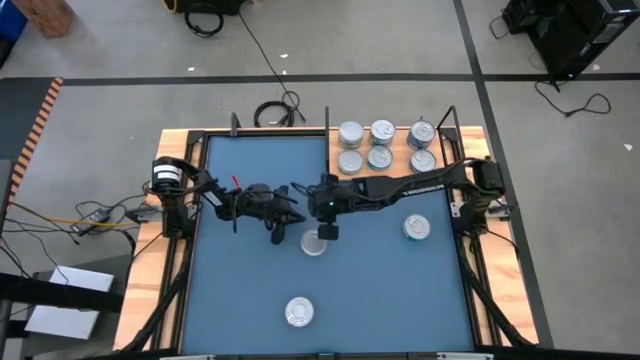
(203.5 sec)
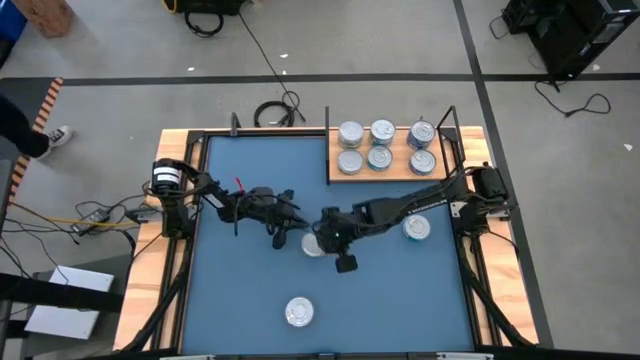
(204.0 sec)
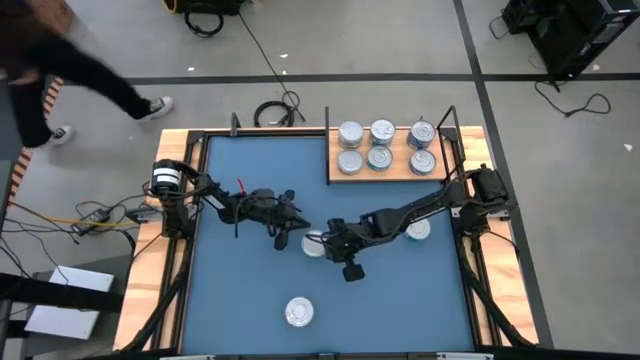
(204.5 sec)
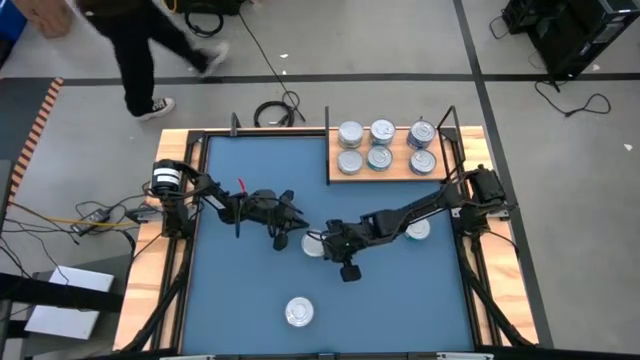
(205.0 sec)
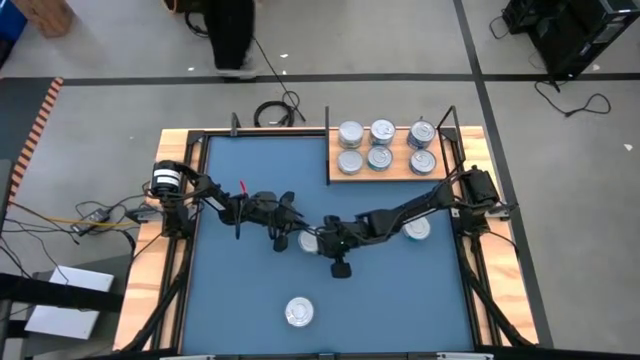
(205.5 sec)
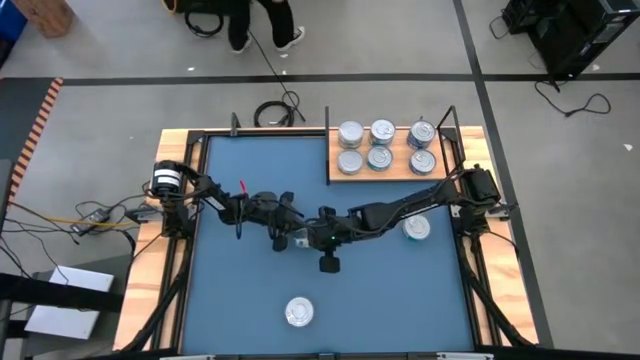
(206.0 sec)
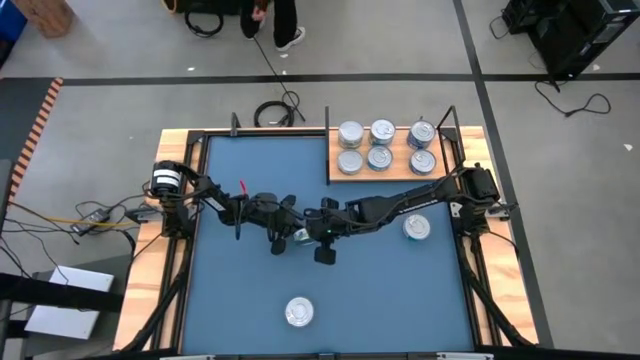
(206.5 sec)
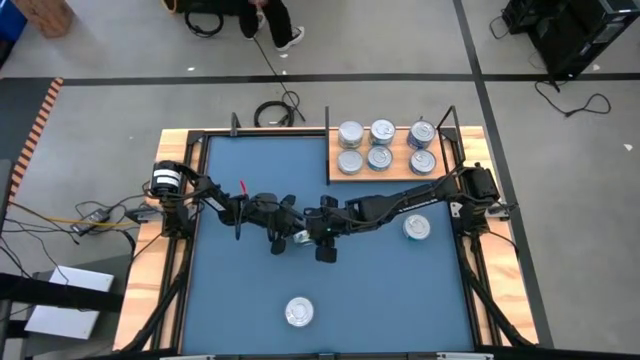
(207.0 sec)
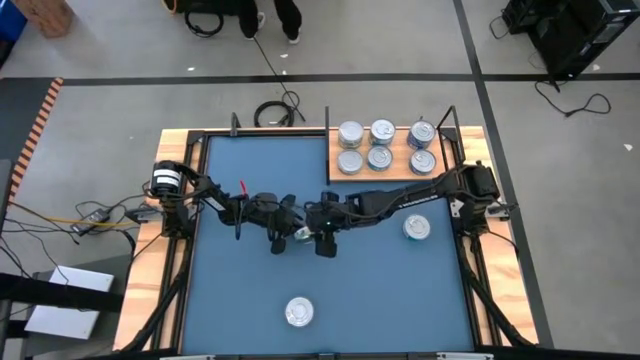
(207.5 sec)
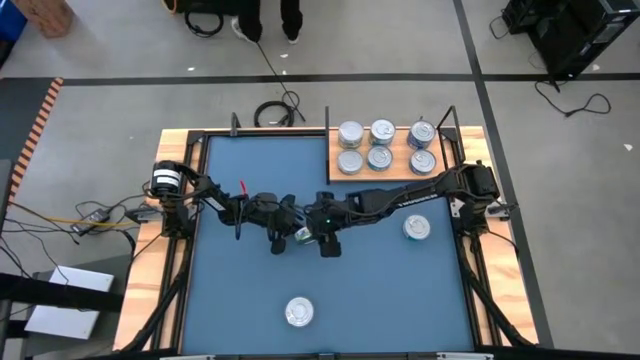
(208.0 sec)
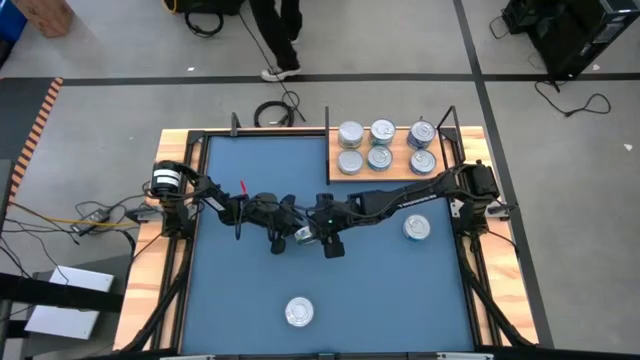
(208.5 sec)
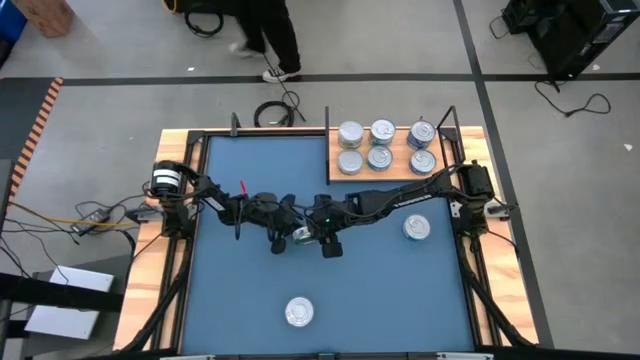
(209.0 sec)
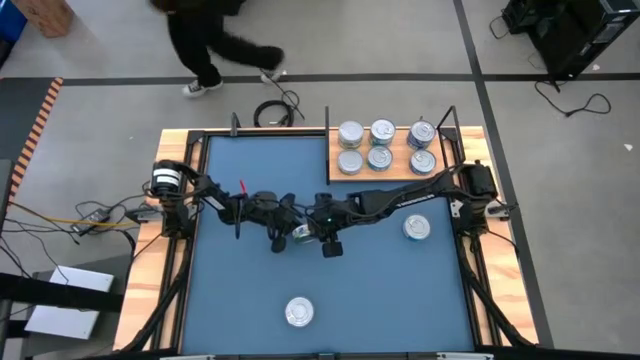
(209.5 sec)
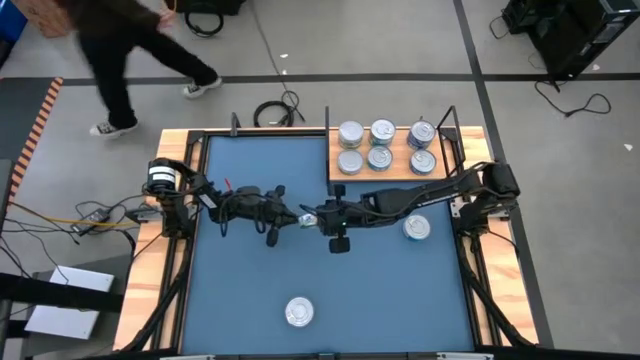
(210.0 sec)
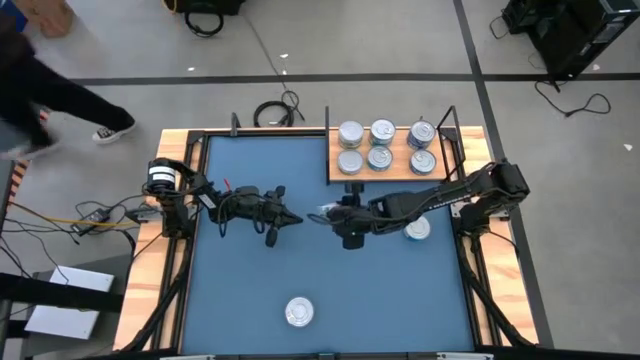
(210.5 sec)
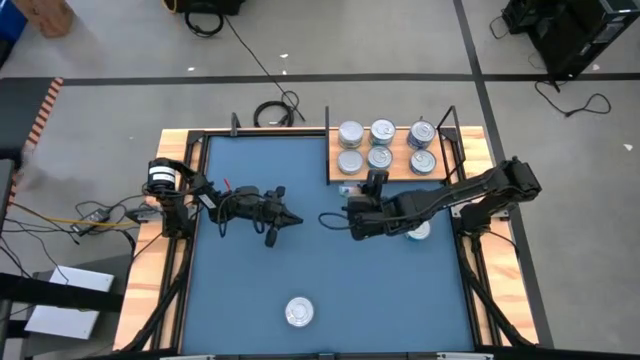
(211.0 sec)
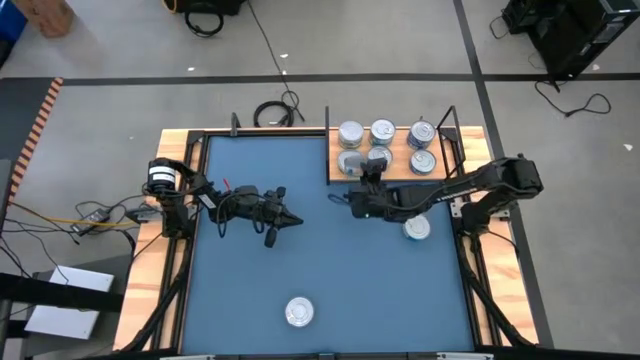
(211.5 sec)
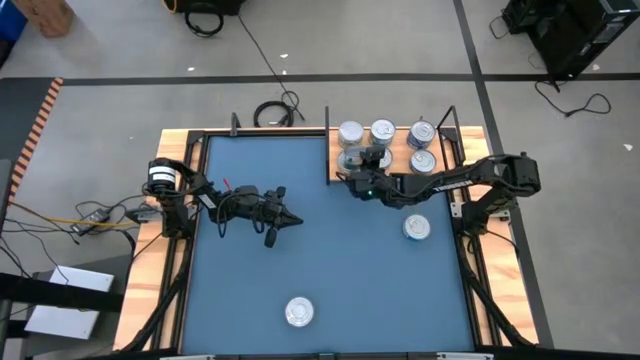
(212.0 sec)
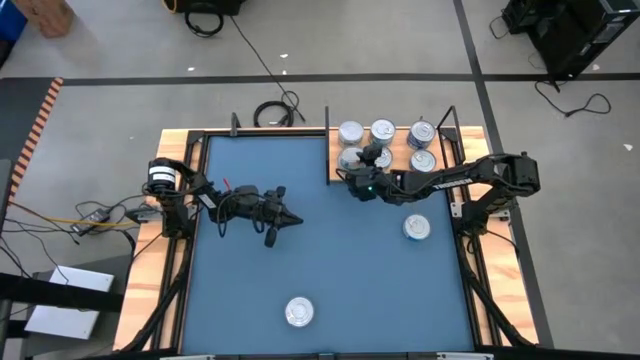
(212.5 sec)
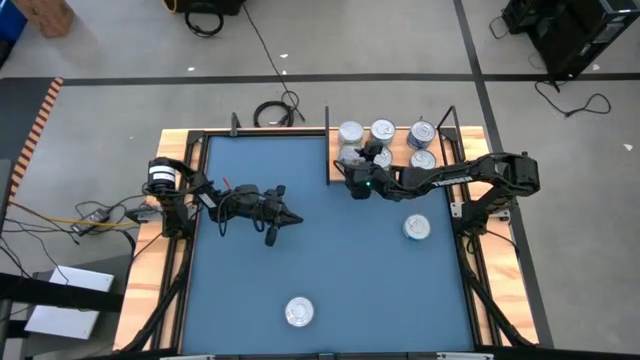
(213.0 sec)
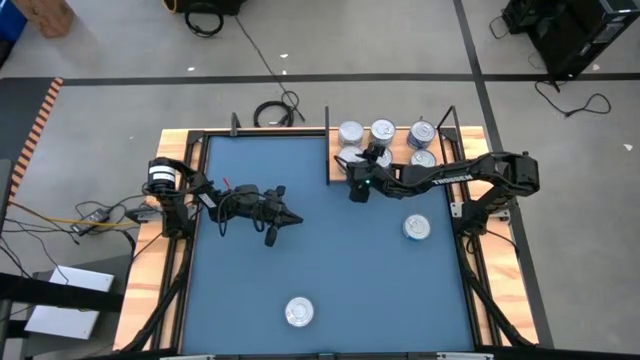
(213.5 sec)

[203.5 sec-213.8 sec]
Task: Stack canned seafood by type on shelf
Stack the green tuna can on to the green tuna can on the shelf

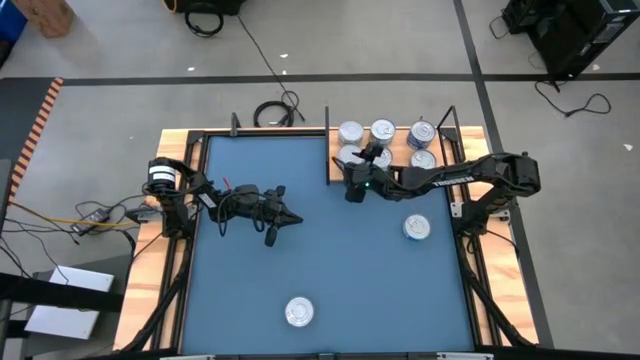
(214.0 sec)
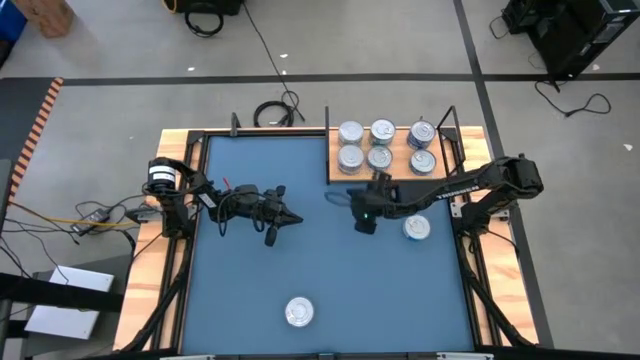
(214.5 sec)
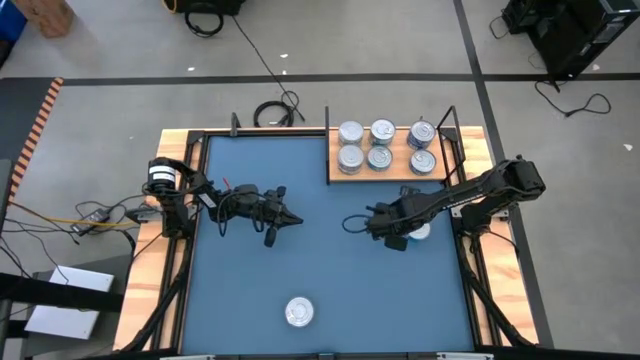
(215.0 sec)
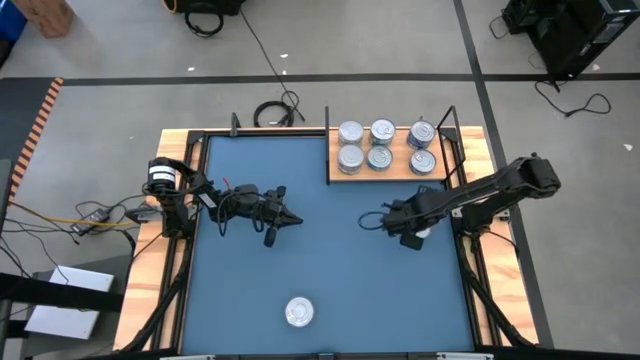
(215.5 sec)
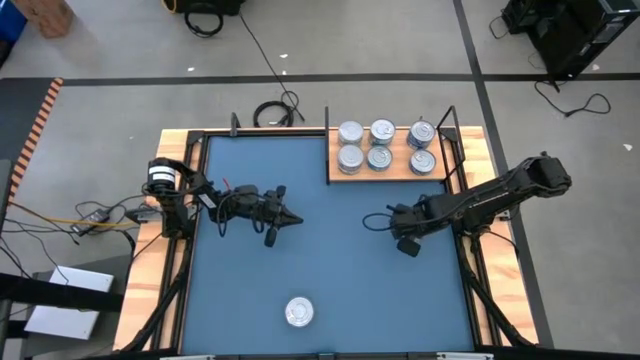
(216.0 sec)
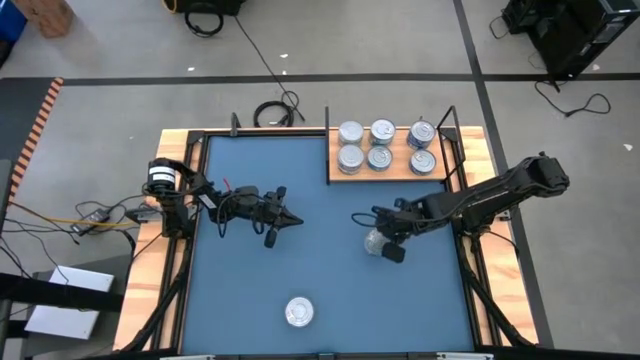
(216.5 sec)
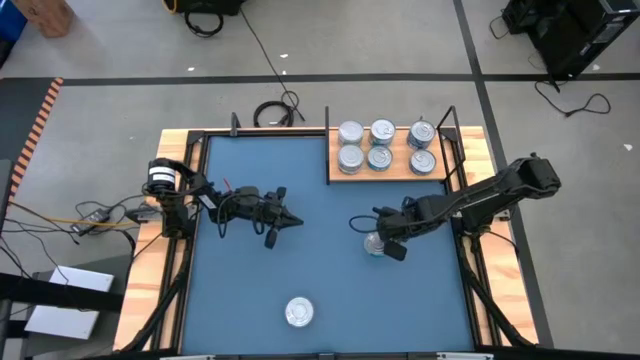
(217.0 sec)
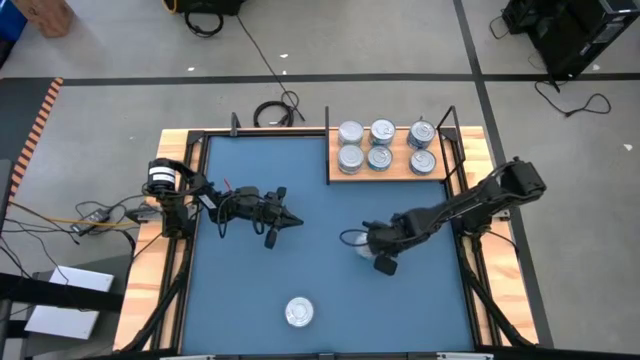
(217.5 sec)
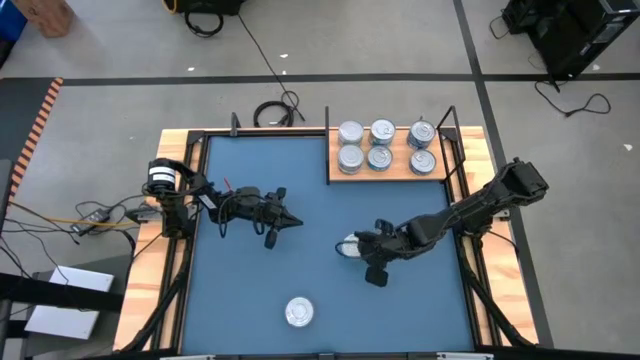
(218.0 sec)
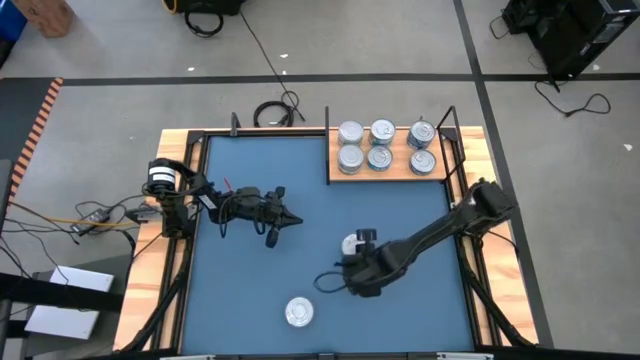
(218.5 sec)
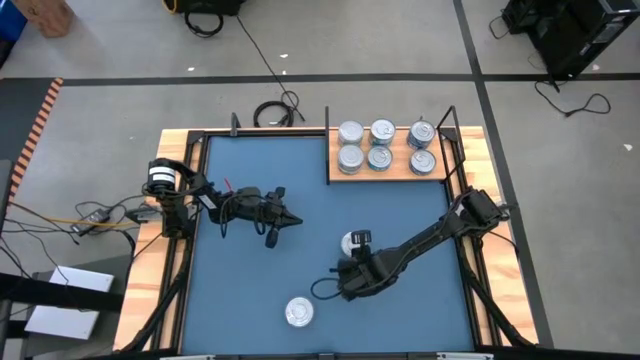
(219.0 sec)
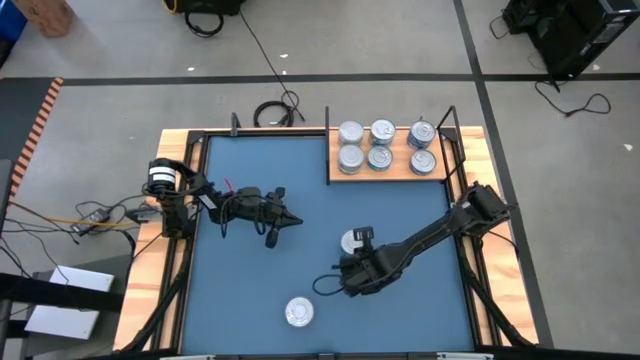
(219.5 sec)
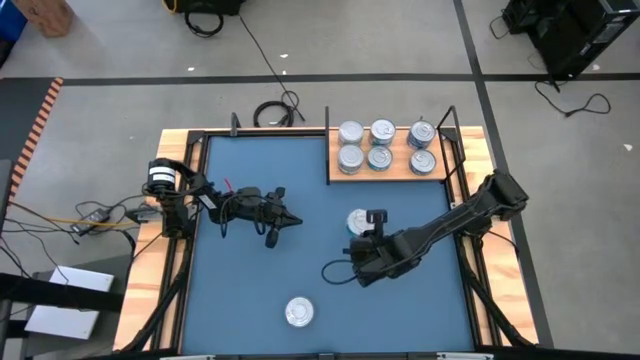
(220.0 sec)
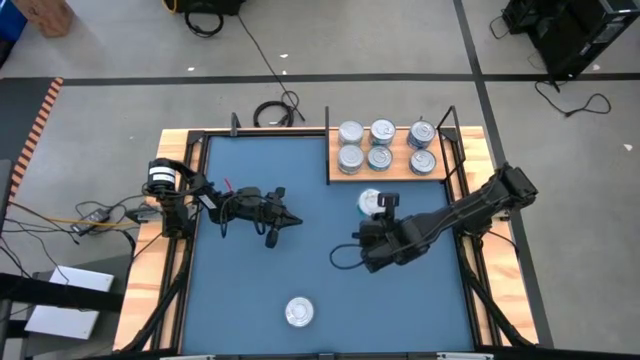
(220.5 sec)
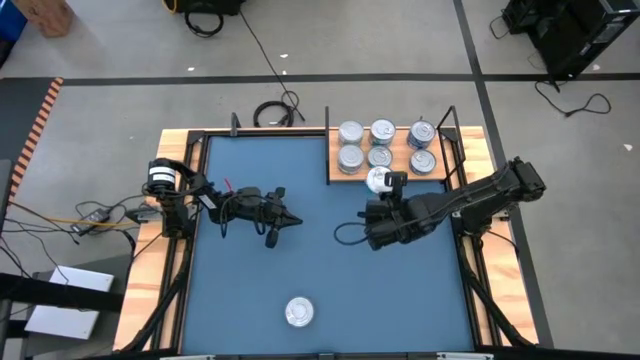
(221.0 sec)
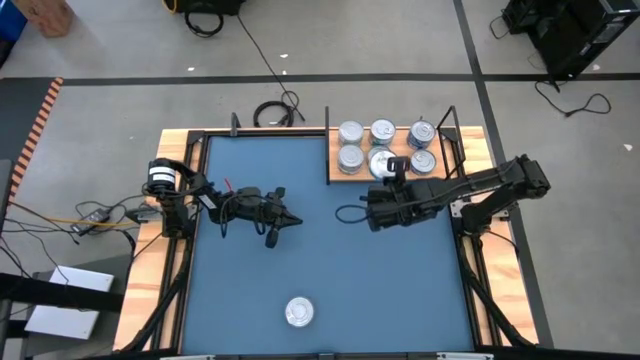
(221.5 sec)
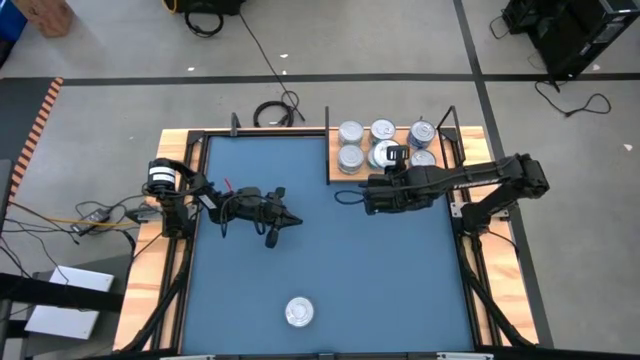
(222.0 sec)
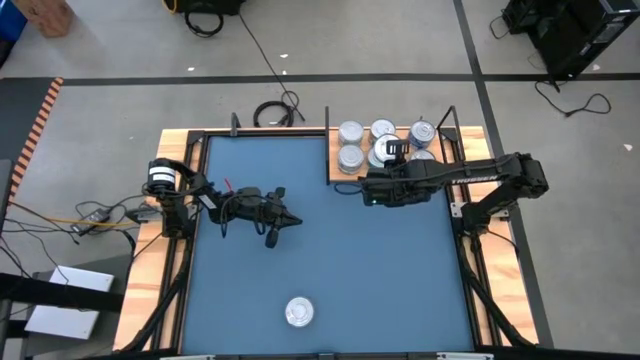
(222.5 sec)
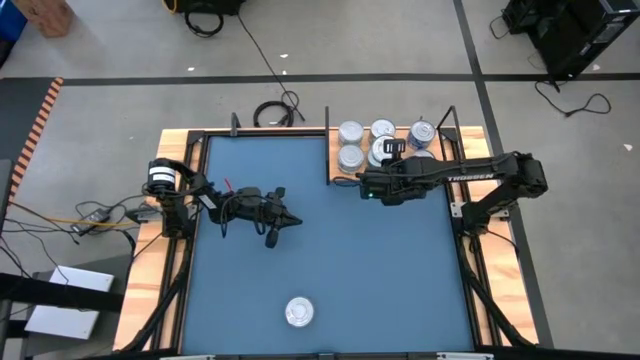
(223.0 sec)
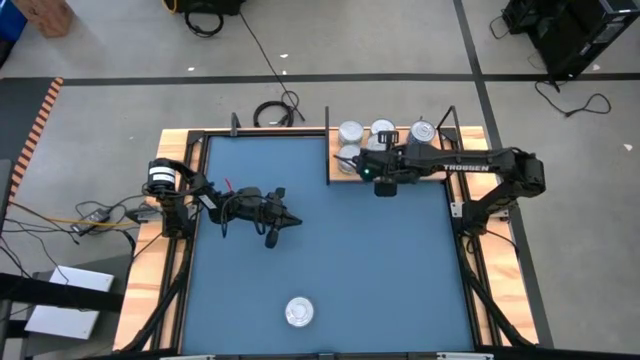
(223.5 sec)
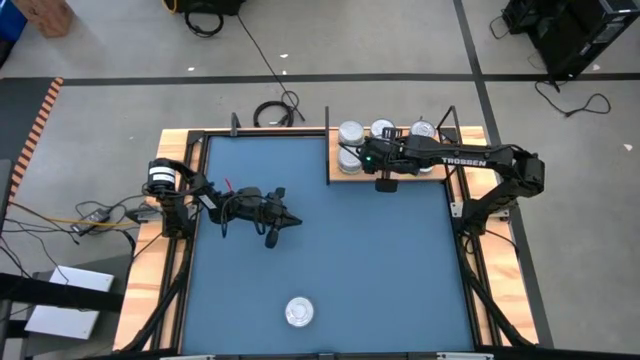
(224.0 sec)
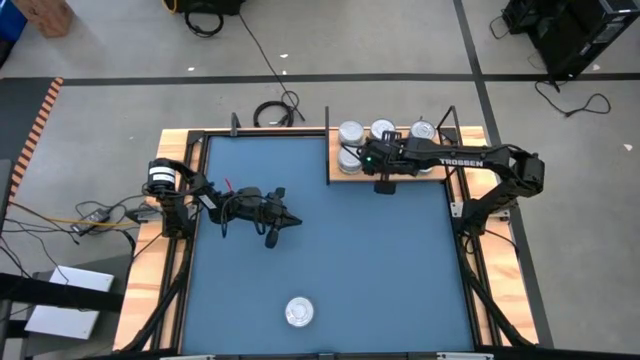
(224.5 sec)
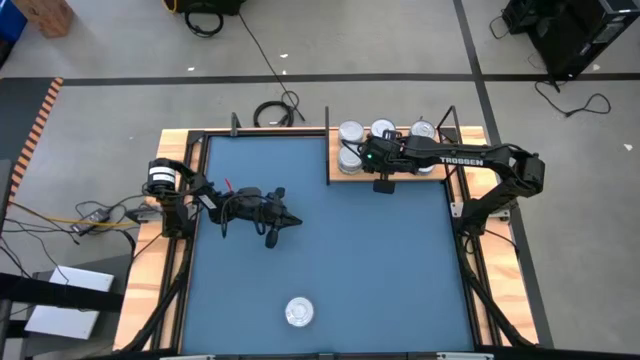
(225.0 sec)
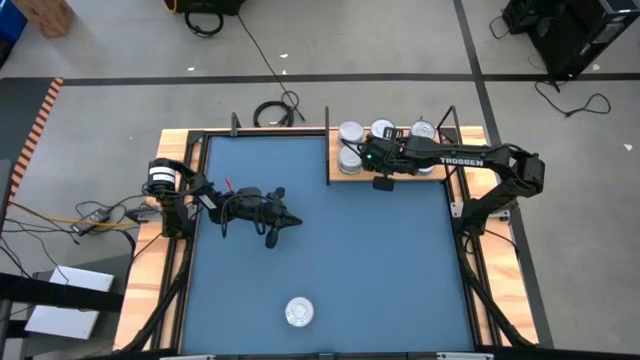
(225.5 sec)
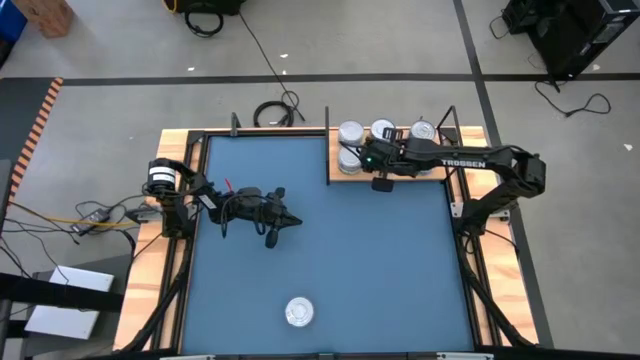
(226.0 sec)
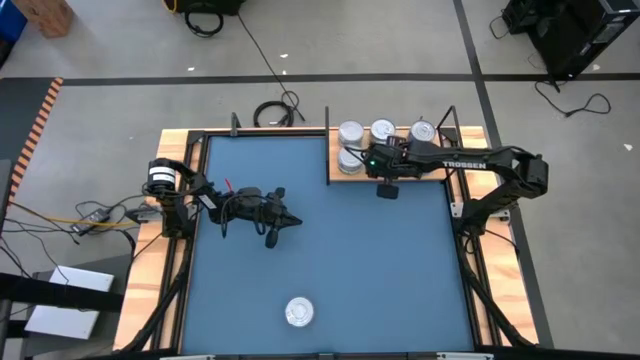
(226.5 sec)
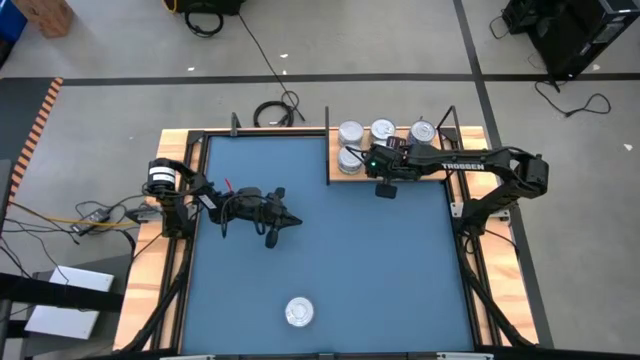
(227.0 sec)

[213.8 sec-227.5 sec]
Stack the yellow and blue tuna can on to the yellow and blue tuna can on the shelf
